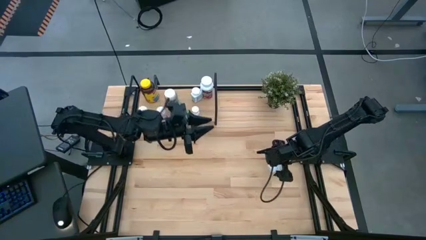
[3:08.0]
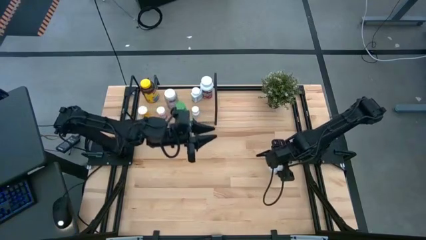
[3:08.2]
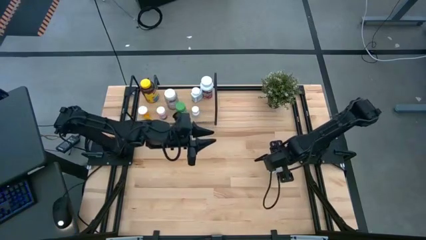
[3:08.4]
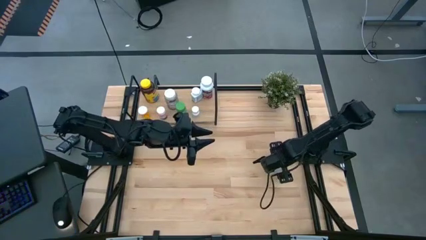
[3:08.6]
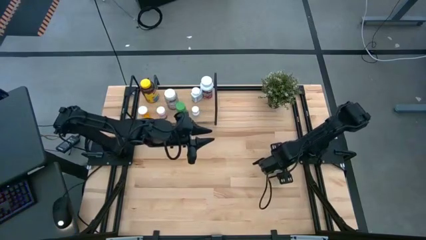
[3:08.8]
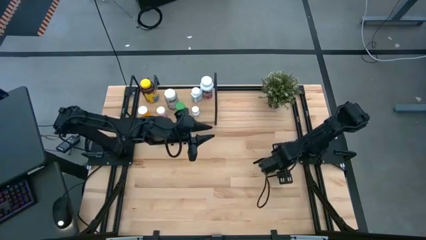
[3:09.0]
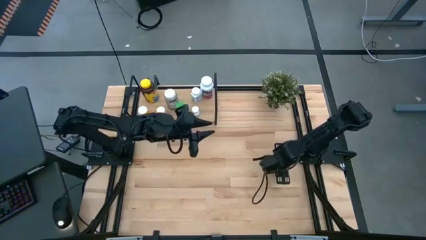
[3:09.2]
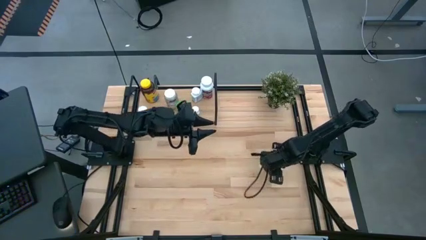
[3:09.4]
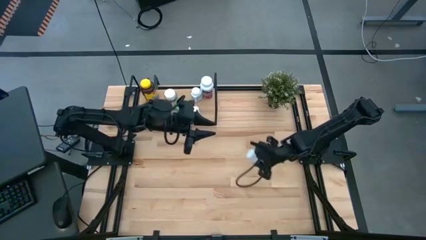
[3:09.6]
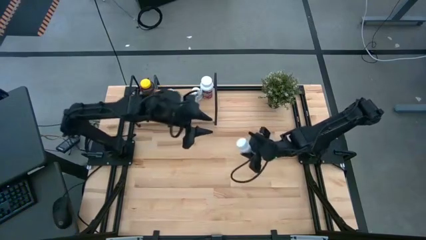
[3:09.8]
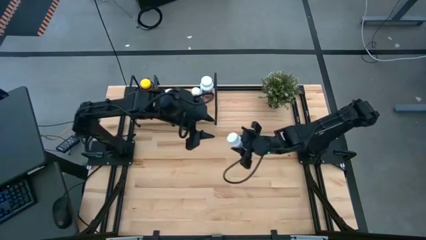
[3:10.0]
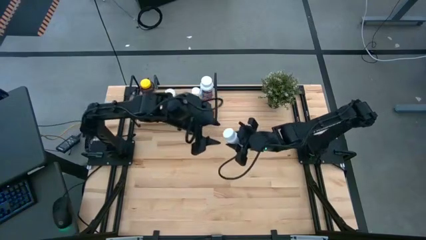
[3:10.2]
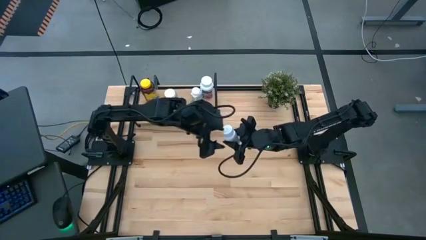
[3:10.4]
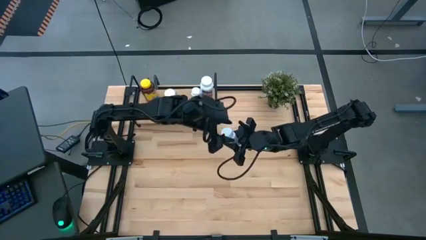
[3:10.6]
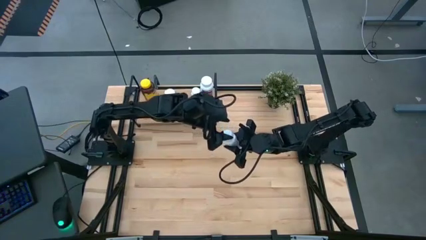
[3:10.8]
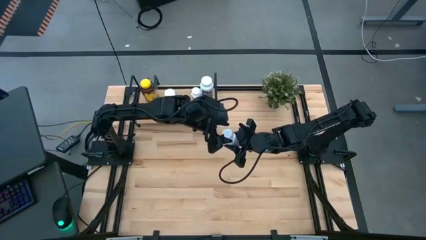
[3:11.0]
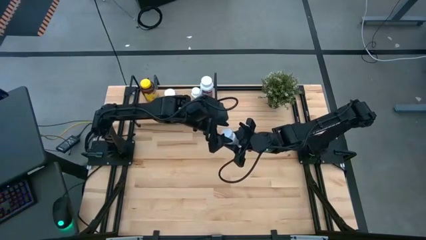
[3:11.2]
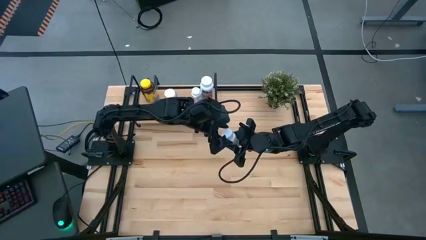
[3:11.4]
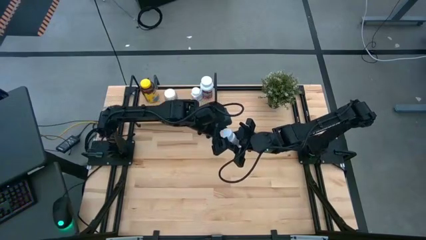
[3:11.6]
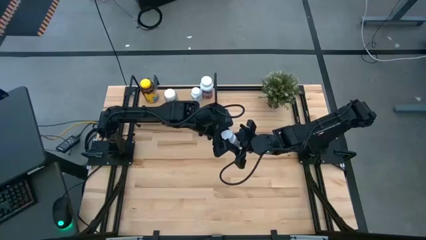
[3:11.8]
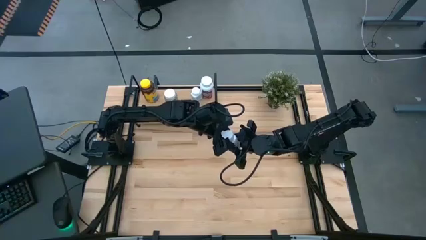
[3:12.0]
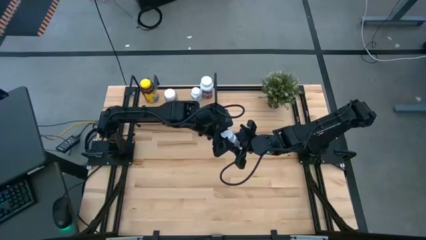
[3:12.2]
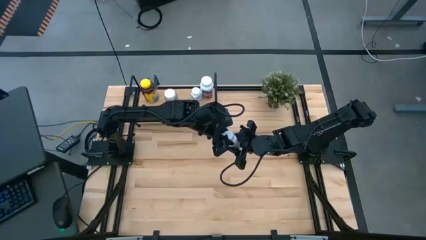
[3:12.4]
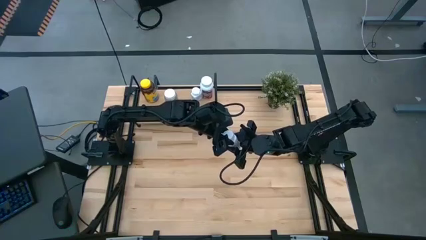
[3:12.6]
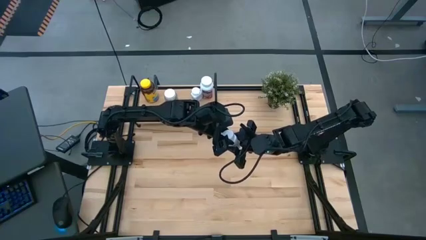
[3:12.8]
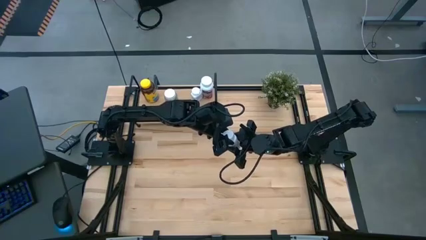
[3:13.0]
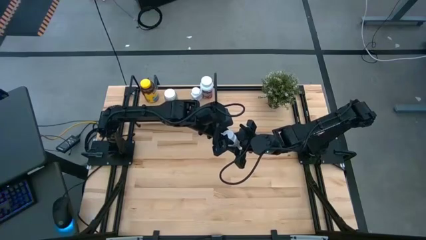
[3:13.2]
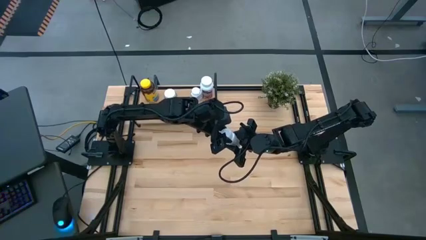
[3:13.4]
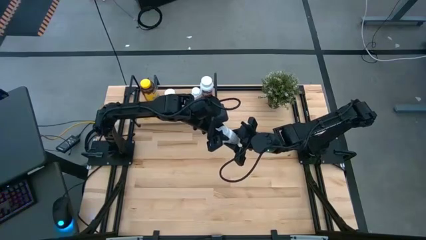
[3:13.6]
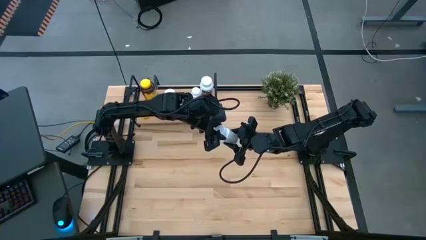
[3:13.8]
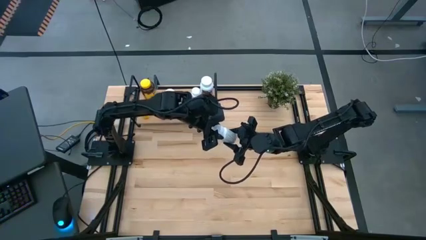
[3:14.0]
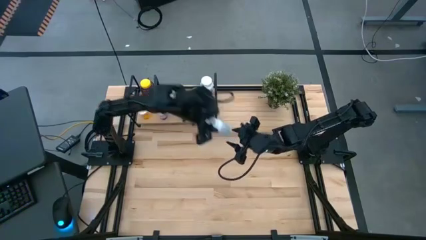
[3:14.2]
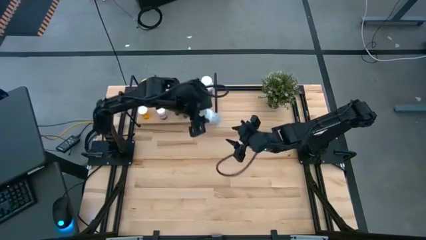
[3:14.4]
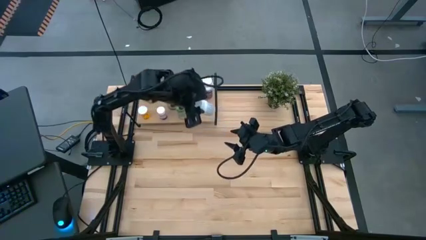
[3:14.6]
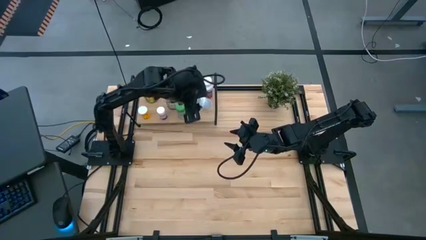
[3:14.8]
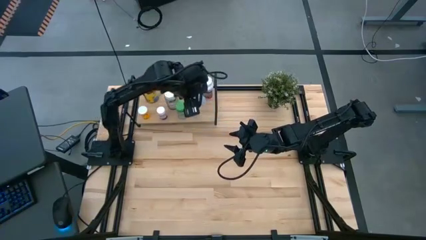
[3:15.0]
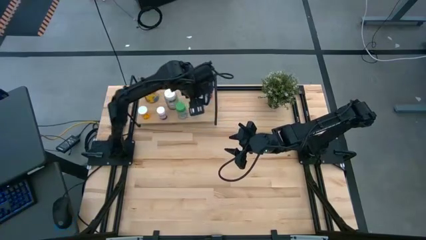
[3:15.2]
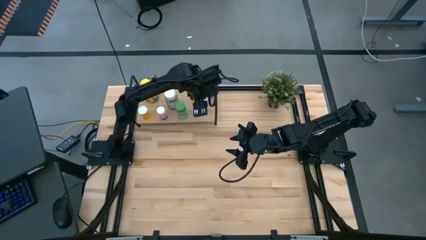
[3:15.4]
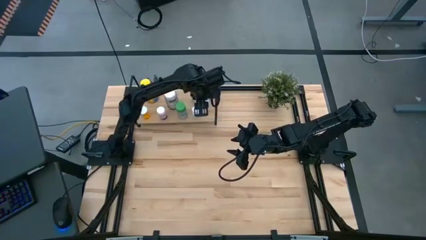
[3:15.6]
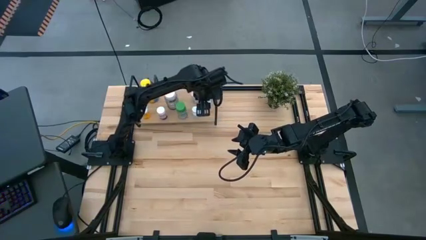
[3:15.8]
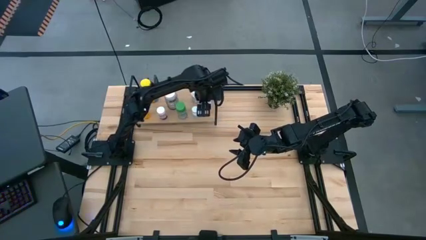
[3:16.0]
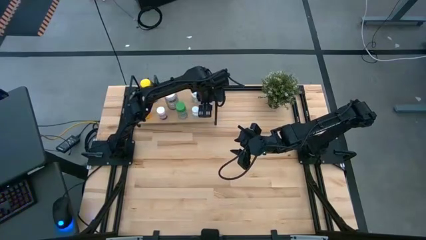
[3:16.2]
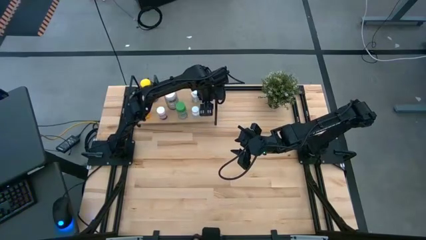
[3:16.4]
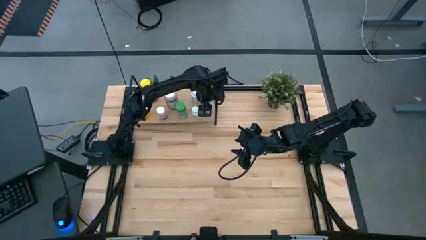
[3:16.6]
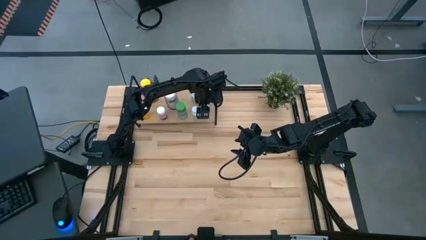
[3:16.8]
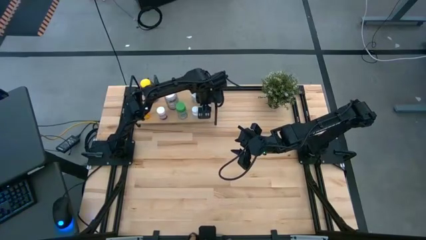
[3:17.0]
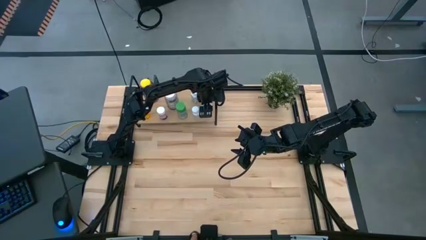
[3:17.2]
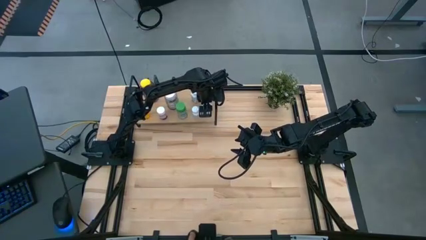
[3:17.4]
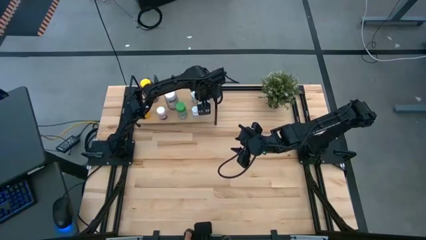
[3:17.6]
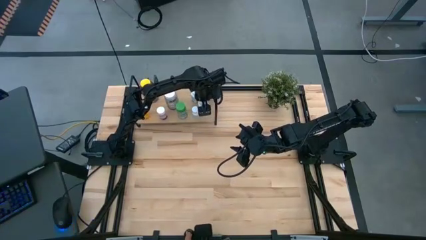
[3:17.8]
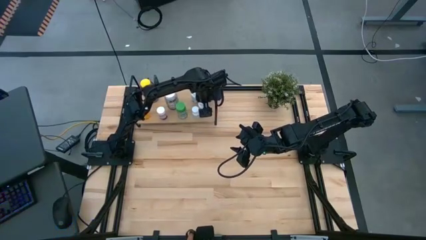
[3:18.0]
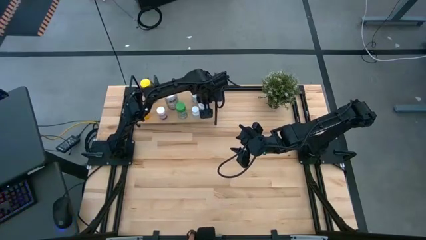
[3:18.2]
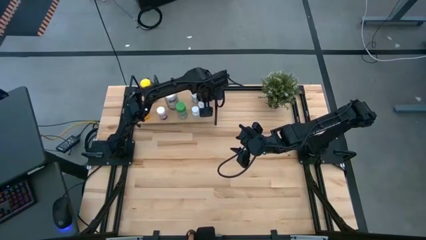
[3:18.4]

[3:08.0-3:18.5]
Task: Pick and place medicine bottles onto shelf by color
Put the white medicine bottle on the shelf

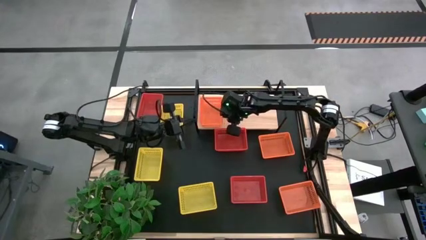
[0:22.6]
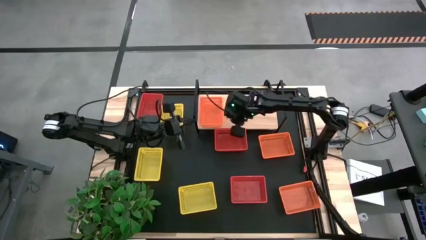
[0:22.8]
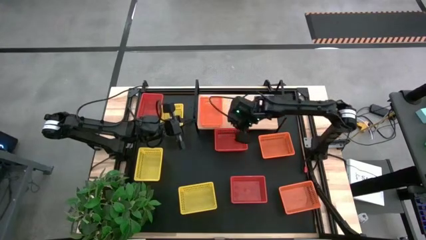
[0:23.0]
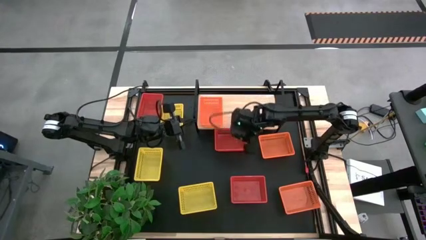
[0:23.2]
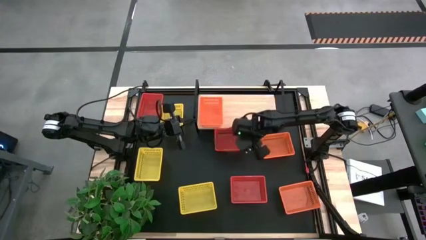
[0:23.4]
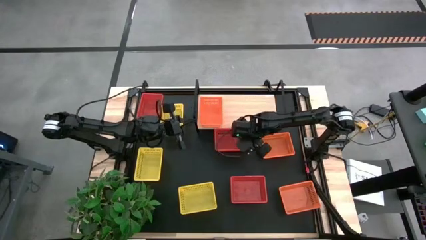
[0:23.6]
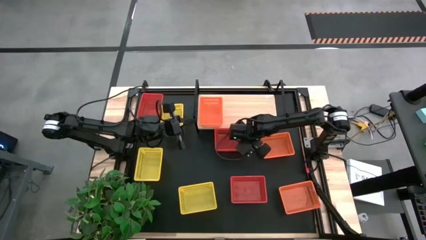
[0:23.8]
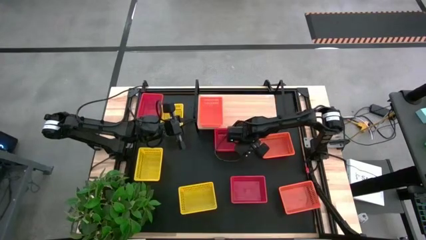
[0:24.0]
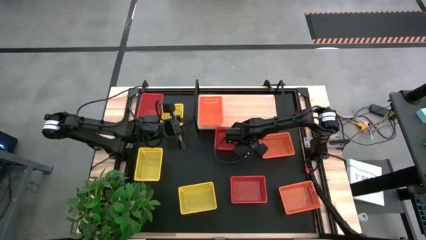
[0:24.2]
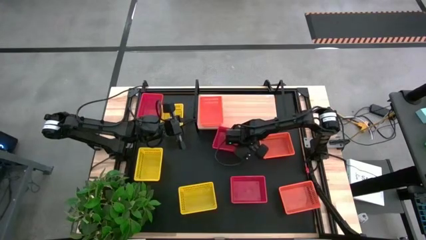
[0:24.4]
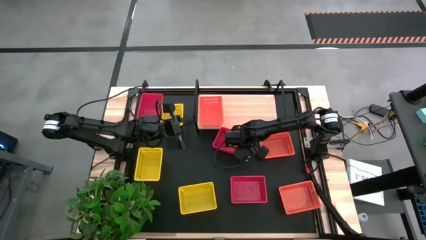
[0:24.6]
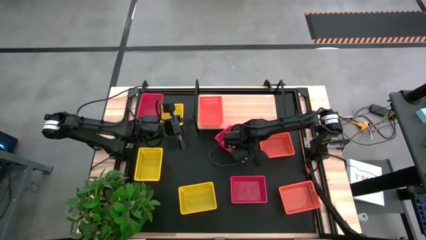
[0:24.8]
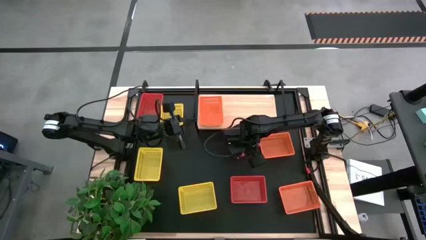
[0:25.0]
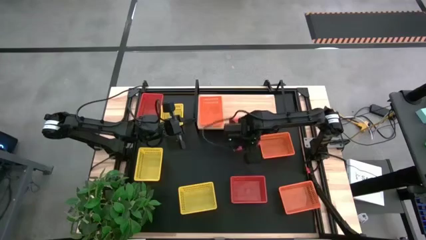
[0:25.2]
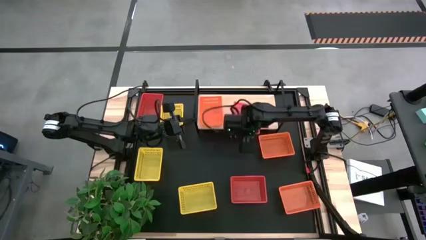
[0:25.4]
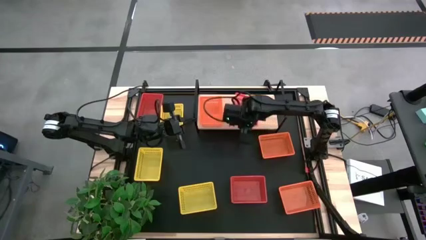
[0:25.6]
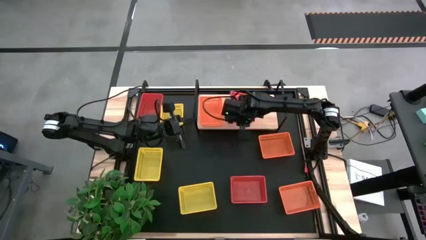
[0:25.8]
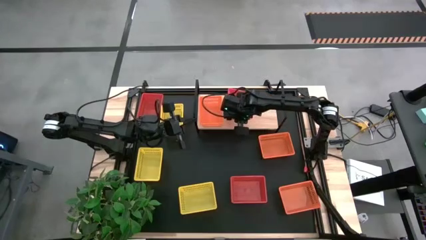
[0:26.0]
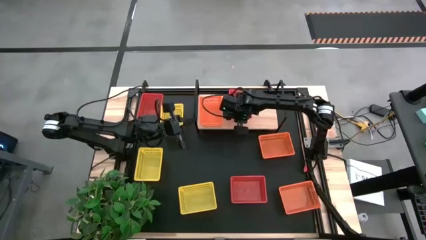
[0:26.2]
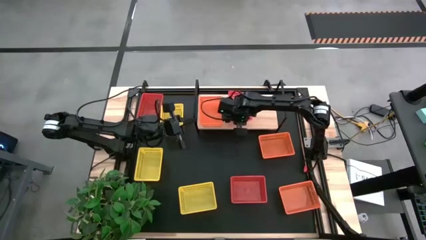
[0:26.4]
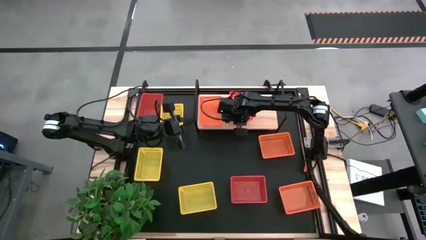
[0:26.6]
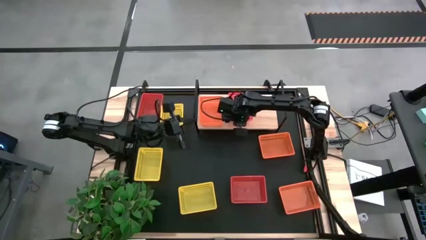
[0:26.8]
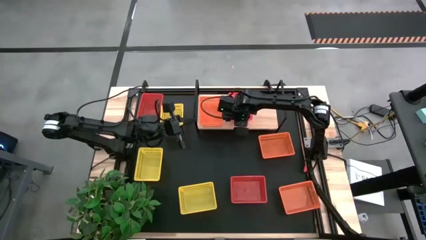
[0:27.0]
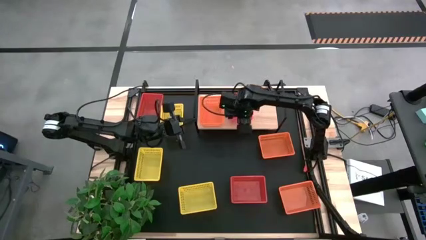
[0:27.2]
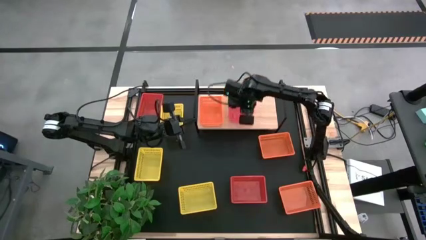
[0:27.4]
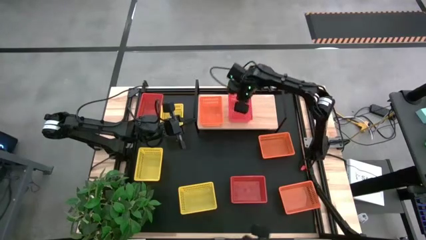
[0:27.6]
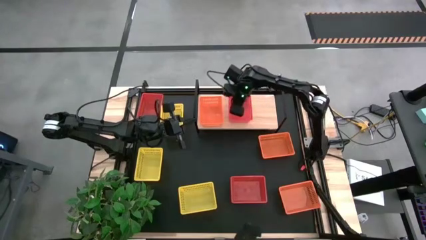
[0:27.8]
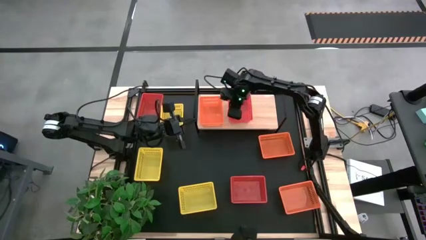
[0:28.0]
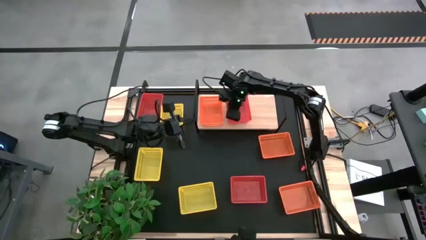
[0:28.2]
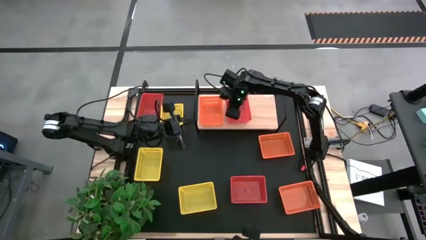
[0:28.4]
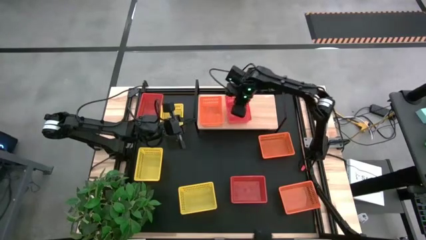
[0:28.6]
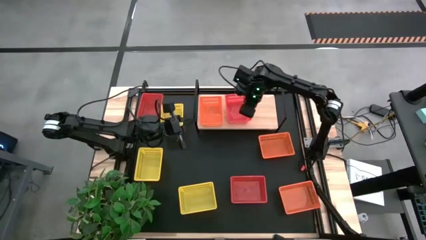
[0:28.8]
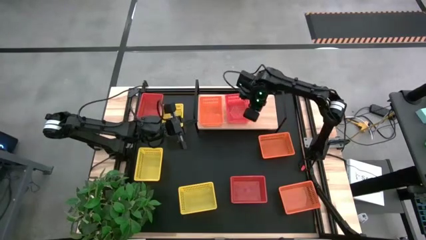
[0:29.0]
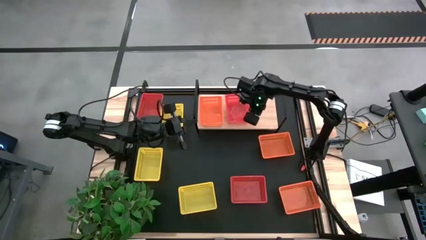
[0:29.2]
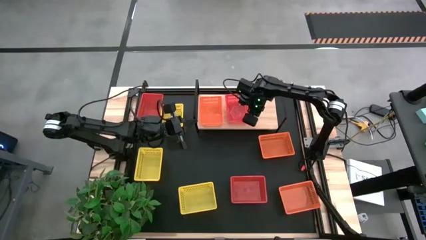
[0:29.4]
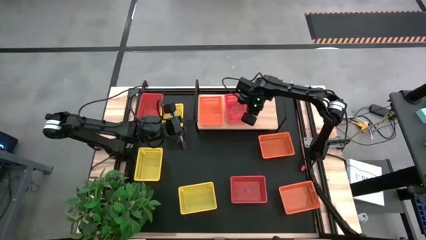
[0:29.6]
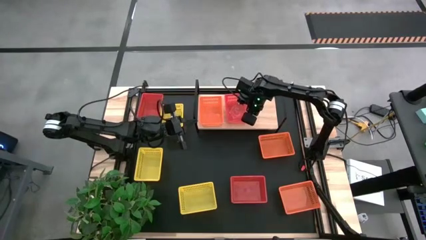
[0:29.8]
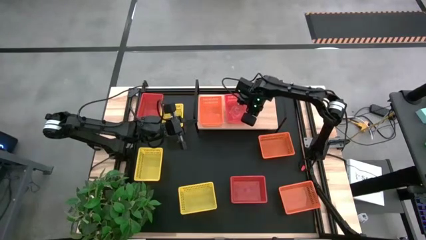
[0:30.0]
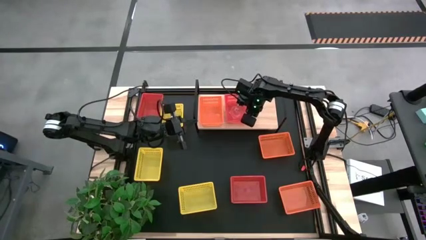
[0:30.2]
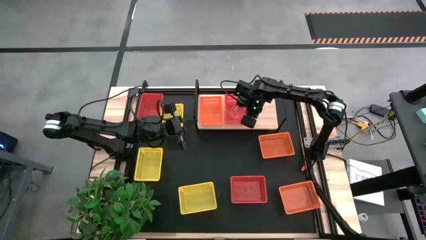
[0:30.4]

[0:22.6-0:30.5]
Task: Stack baskets on shelf by color
Put the middle red basket on the shelf
